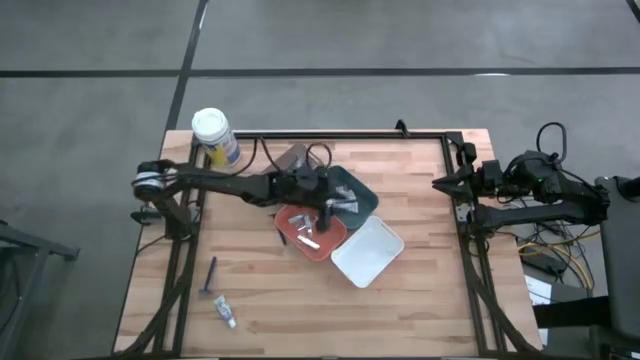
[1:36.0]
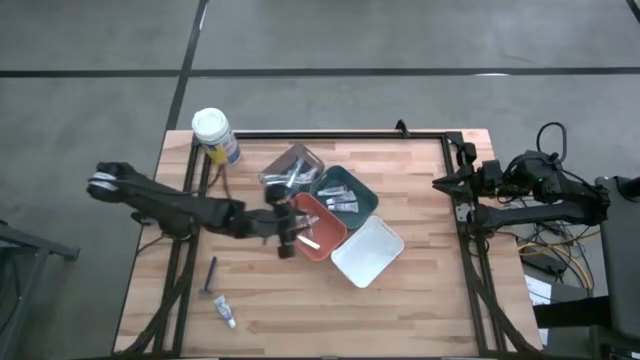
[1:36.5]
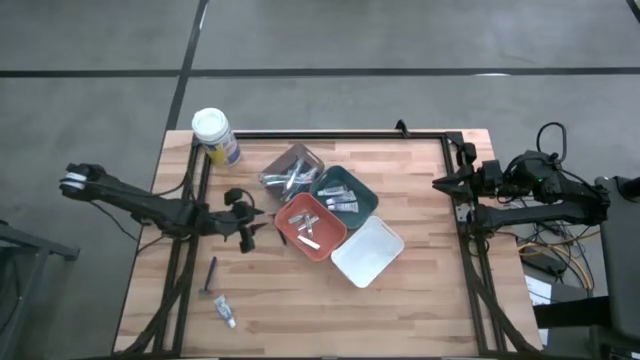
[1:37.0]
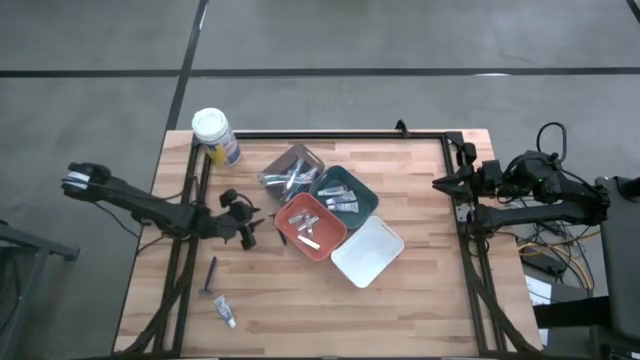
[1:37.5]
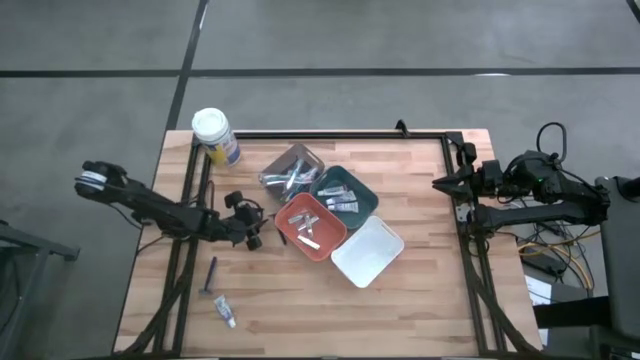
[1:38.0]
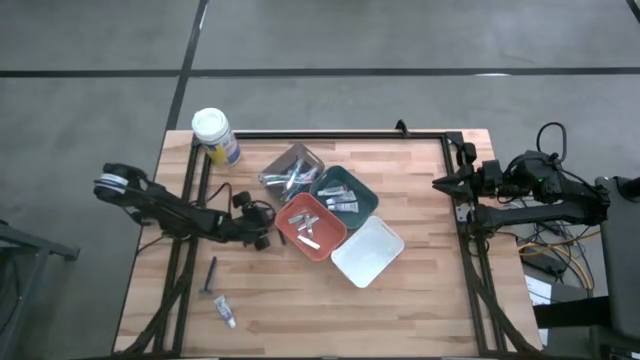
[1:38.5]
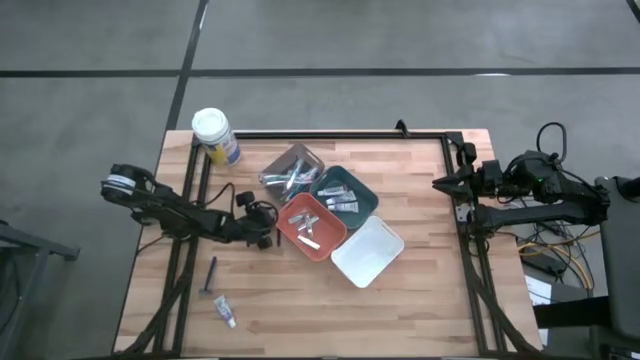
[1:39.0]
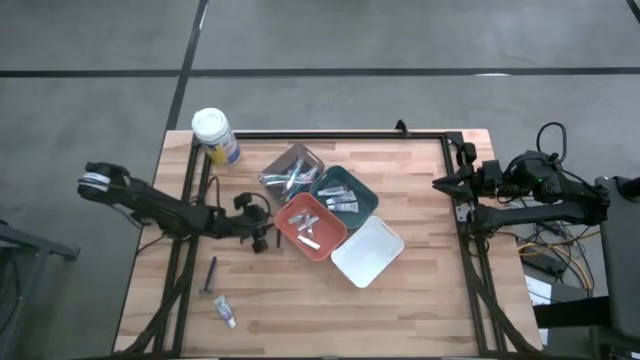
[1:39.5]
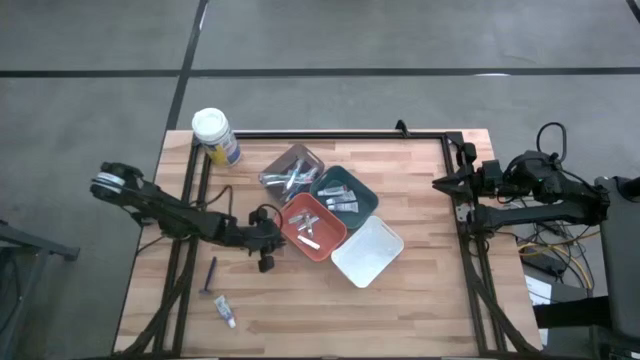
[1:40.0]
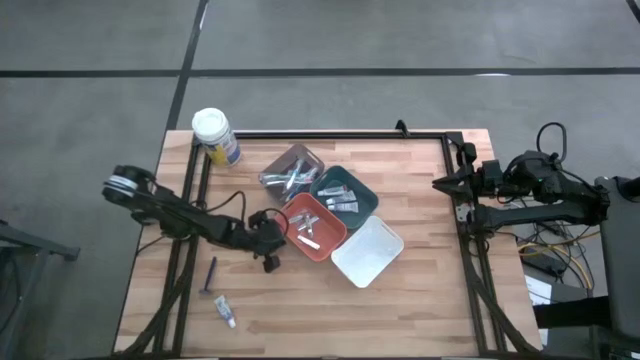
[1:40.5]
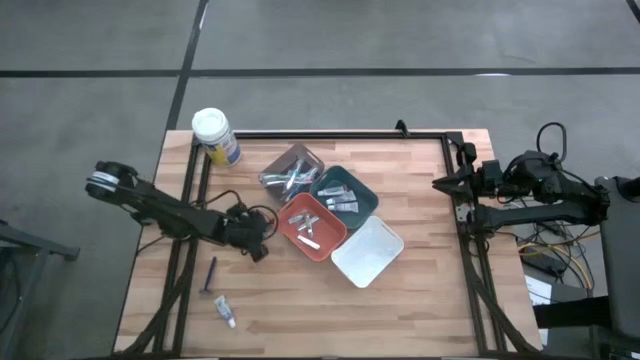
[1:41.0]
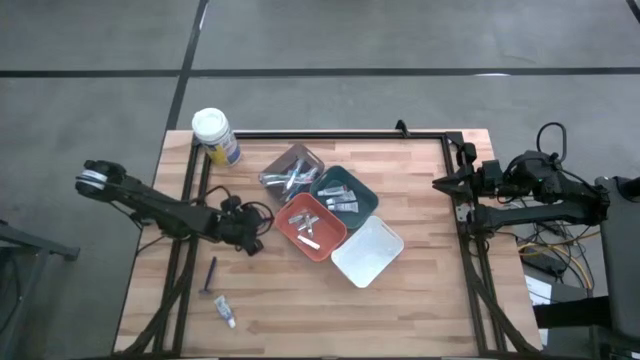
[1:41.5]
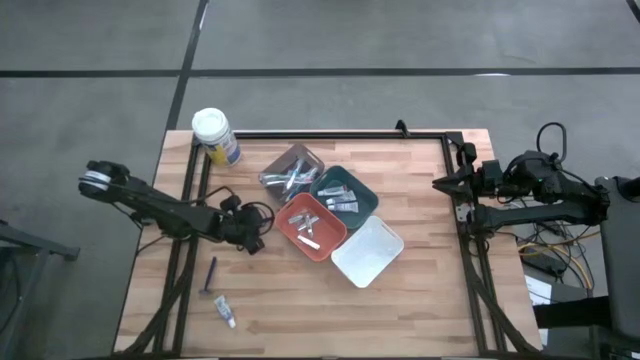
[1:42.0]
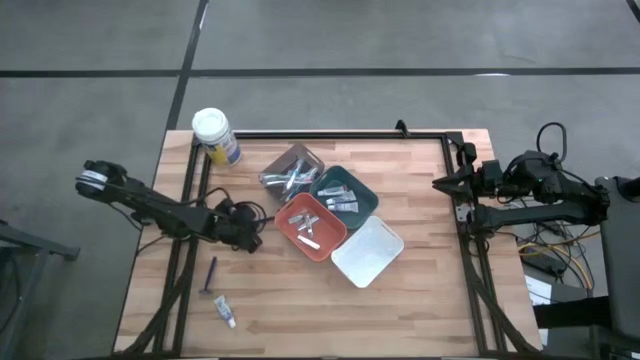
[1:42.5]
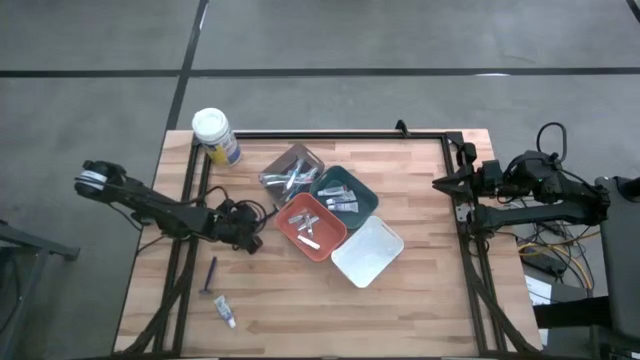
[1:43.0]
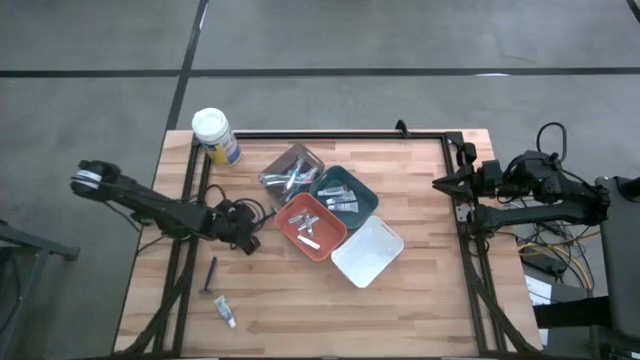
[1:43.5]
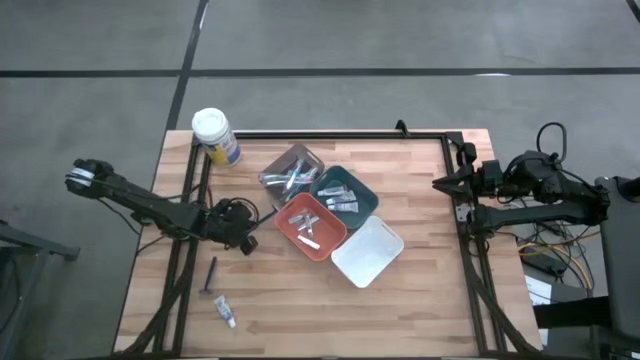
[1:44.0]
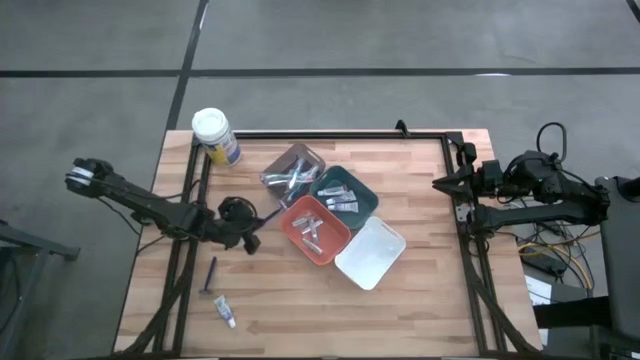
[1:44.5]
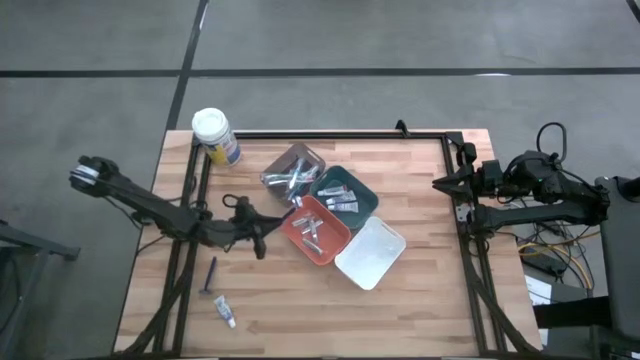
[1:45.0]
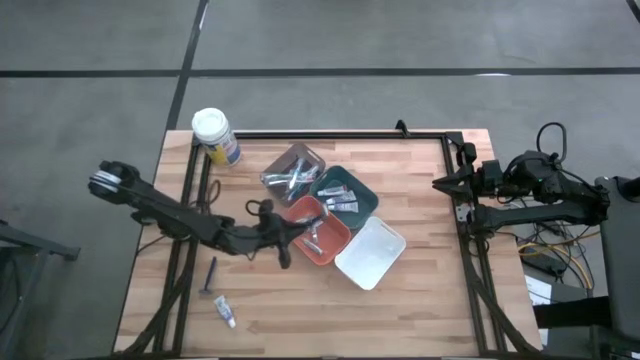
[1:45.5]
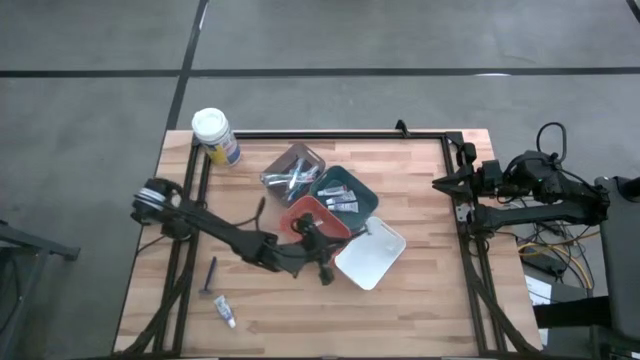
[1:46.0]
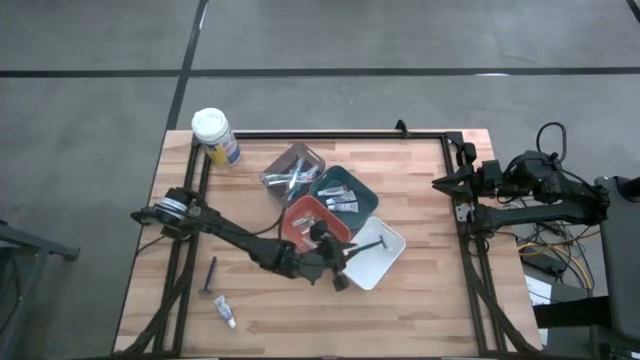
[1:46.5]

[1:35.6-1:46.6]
Task: Pick & Place Travel size toiletries
Put the blue razor into the white bin

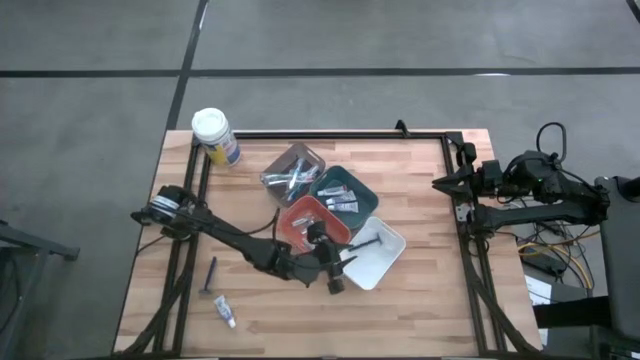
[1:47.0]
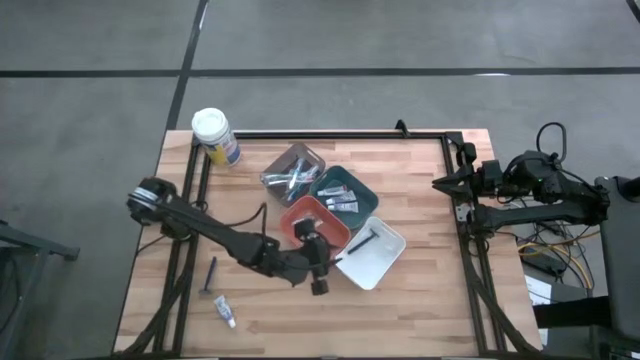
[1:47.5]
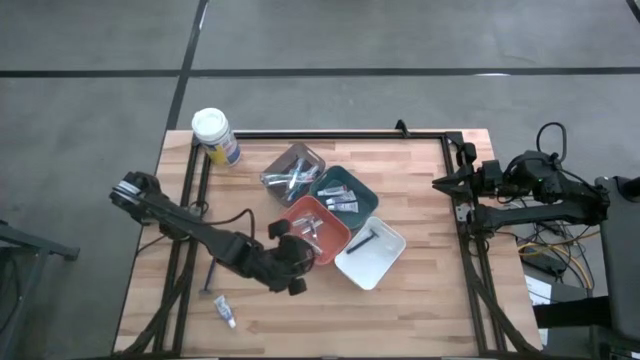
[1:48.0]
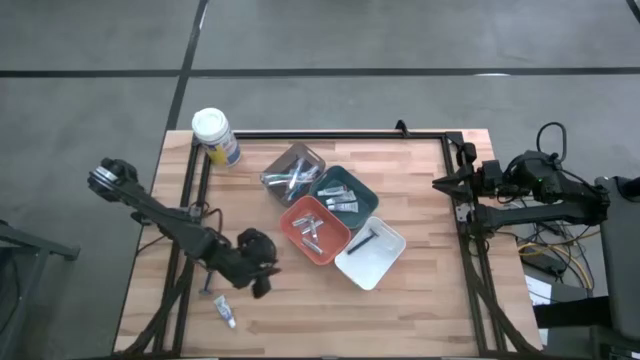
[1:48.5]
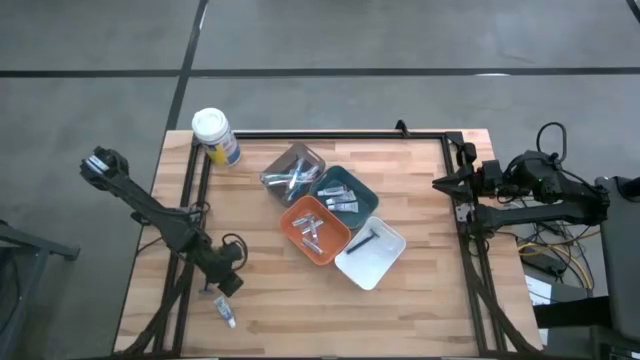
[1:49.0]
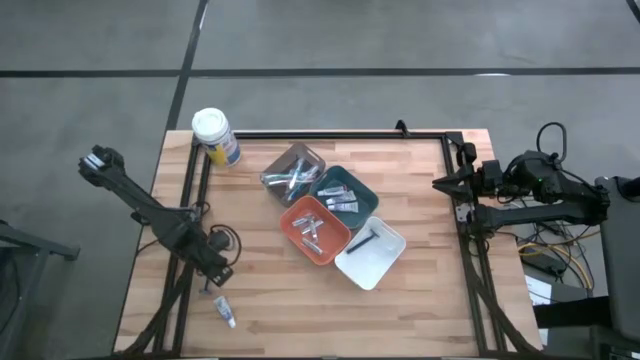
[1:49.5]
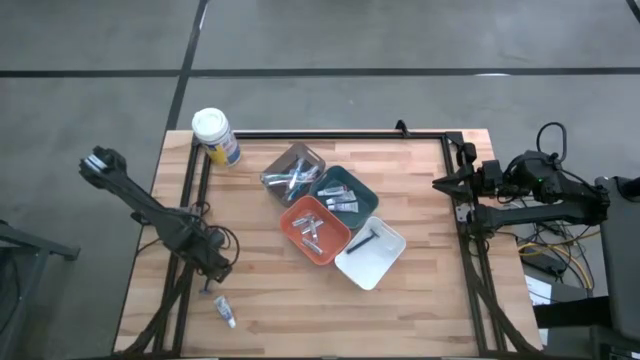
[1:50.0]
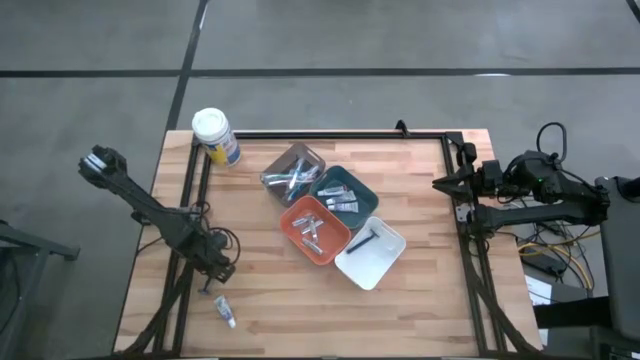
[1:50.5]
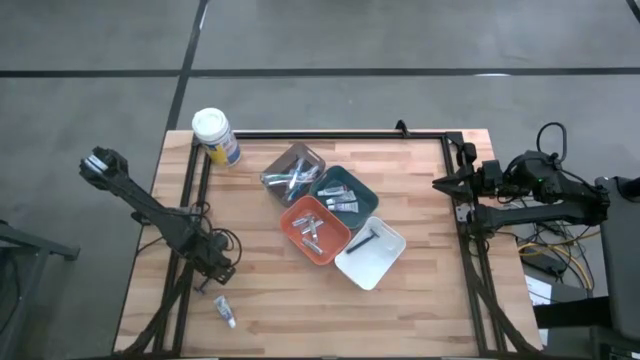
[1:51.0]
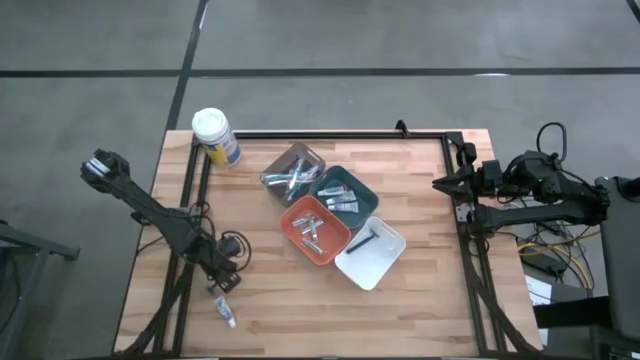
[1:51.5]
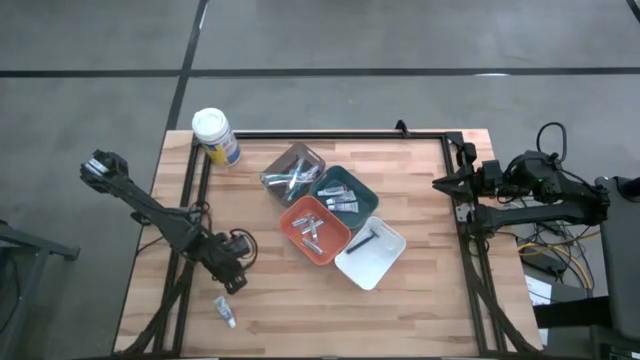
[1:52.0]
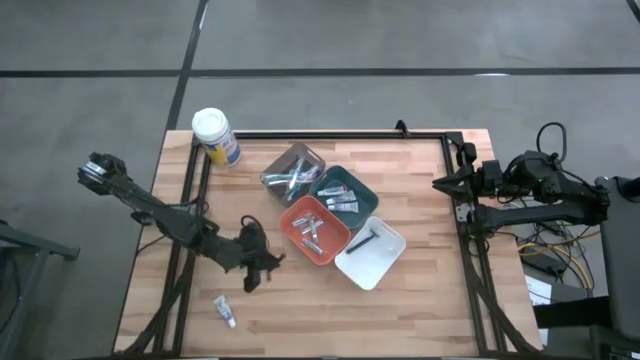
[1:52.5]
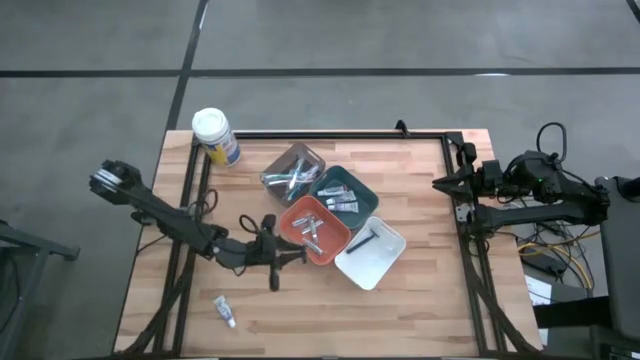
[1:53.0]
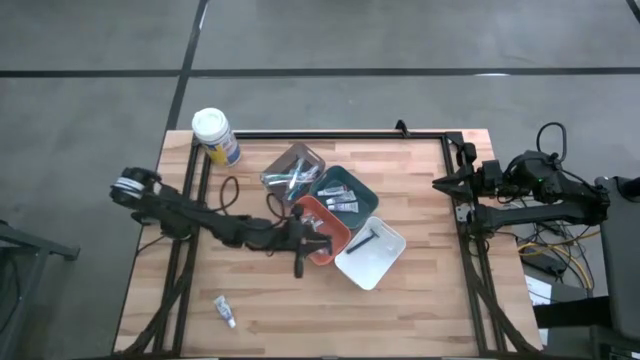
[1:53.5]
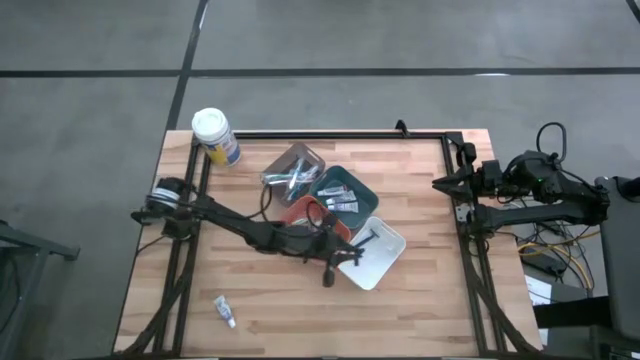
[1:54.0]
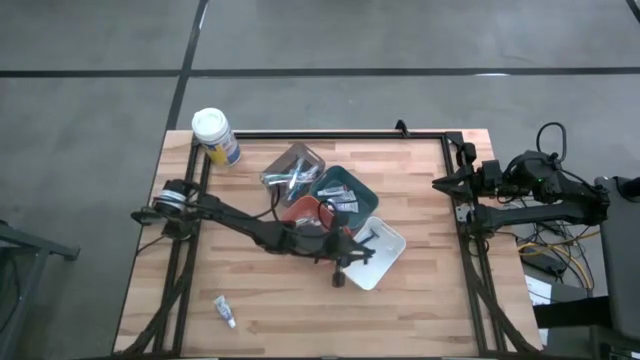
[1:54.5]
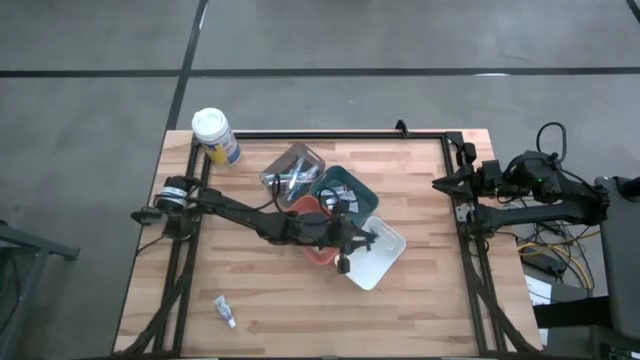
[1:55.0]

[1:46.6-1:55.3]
Put the blue razor into the white bin

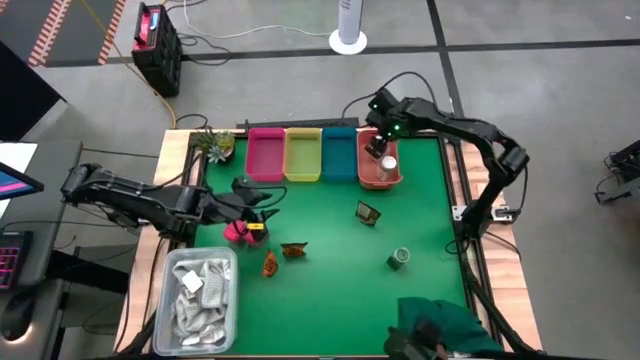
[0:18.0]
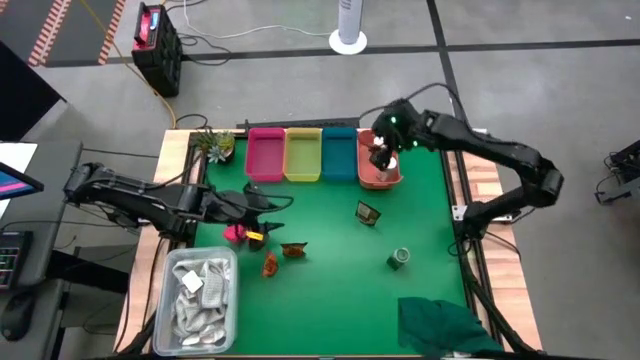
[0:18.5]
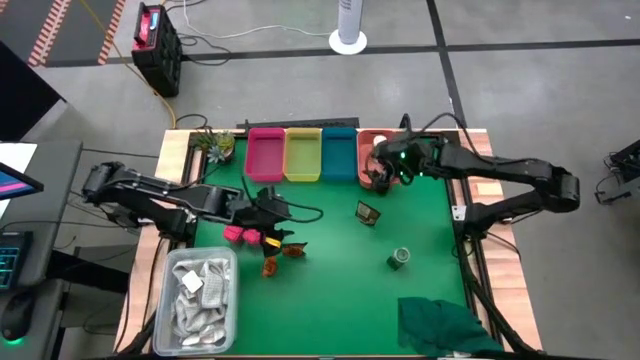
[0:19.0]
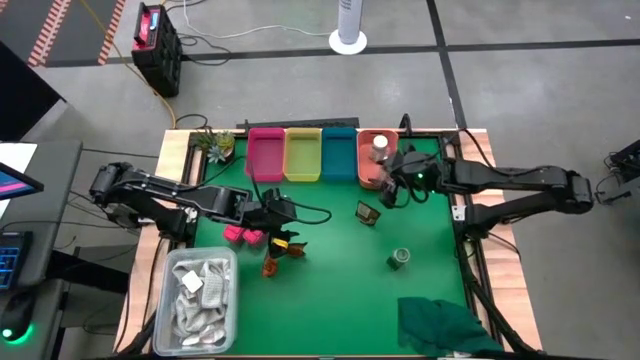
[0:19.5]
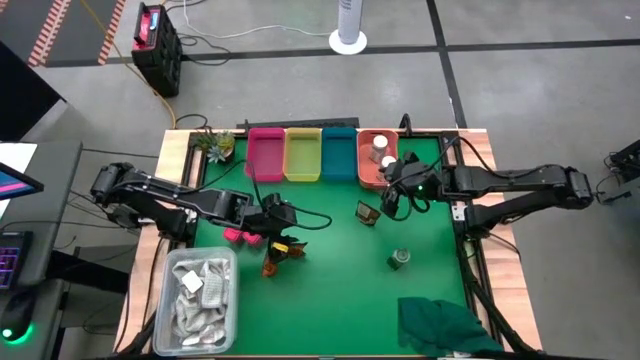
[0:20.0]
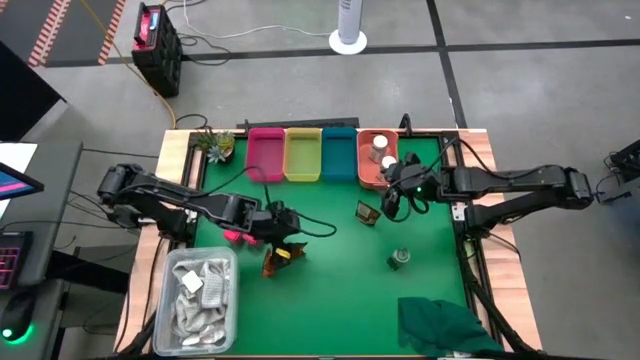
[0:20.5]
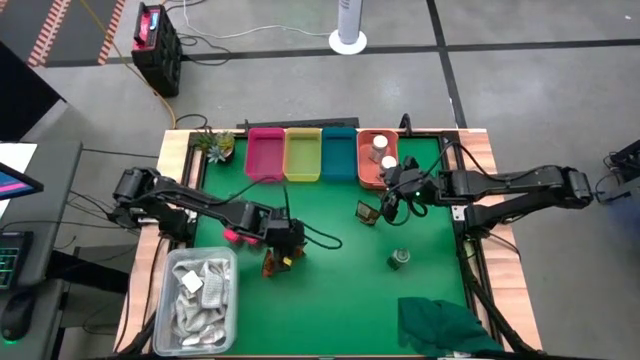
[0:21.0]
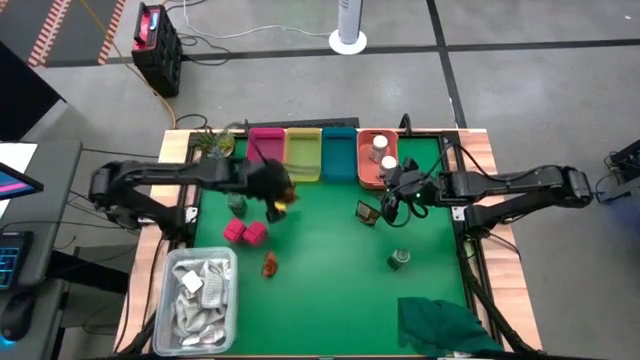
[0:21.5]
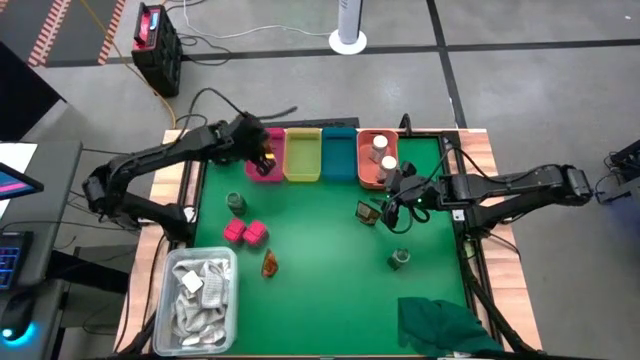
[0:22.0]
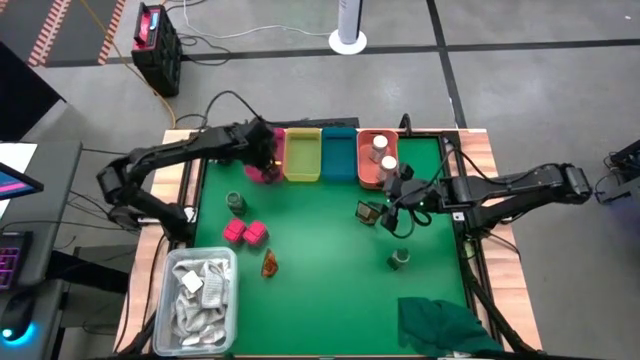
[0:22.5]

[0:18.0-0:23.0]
Task: Sort spices by type
Put the orange seasoning pack into the pink bin
